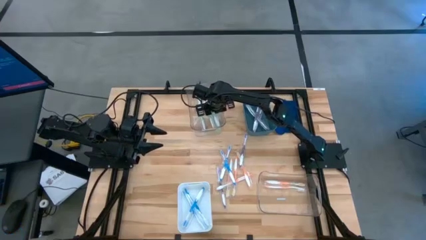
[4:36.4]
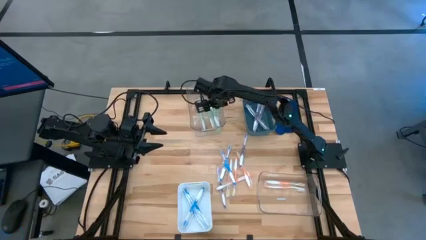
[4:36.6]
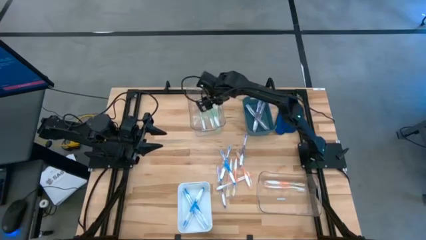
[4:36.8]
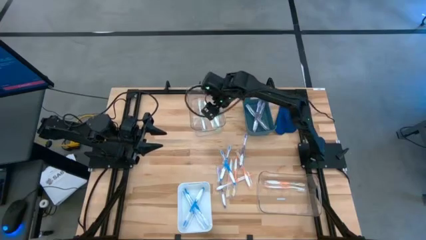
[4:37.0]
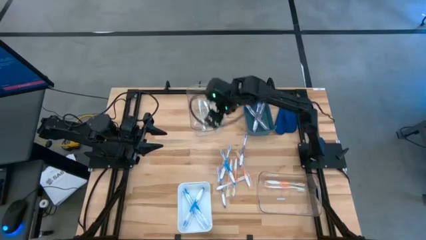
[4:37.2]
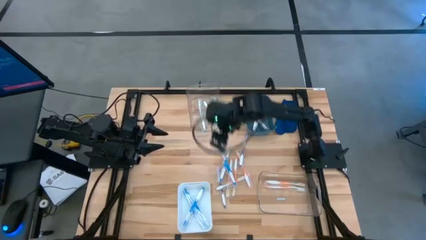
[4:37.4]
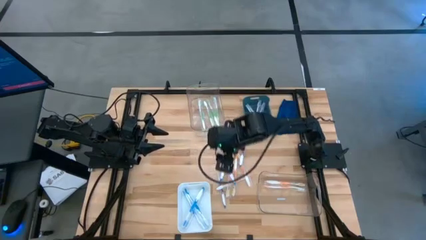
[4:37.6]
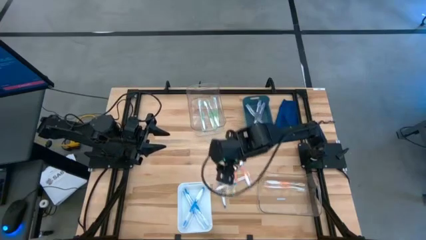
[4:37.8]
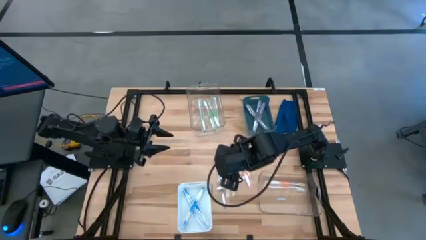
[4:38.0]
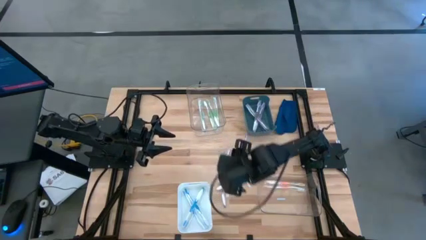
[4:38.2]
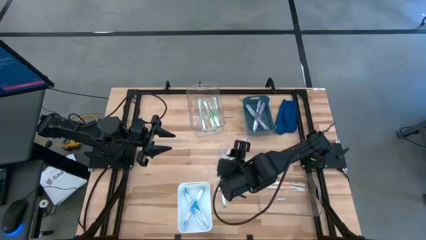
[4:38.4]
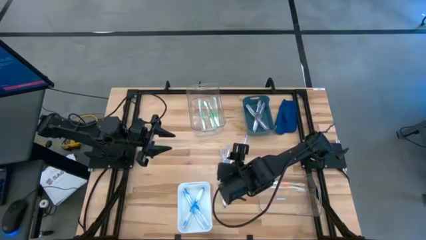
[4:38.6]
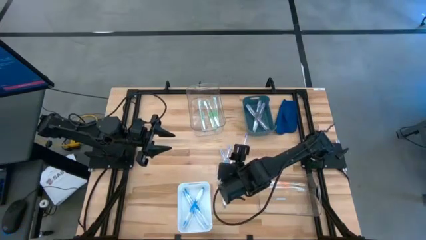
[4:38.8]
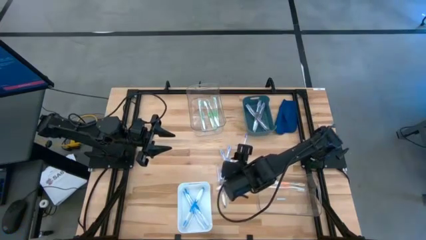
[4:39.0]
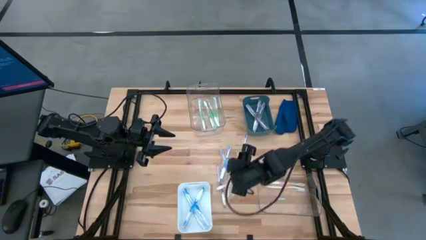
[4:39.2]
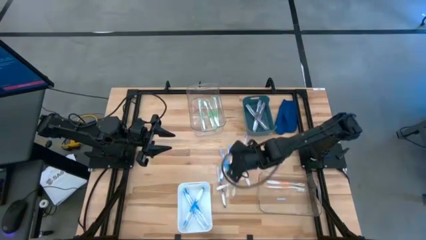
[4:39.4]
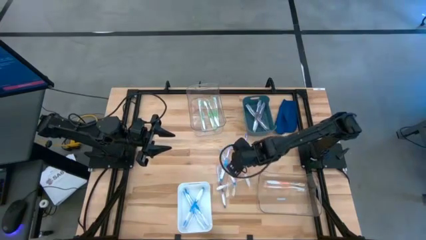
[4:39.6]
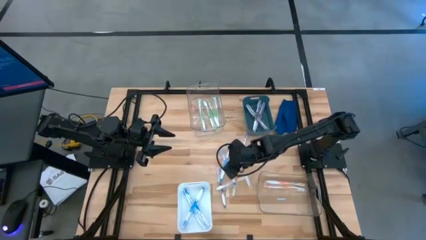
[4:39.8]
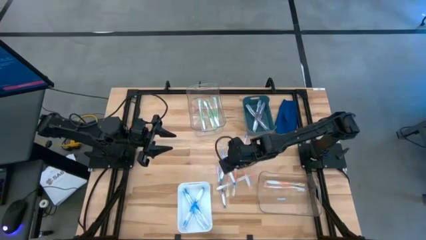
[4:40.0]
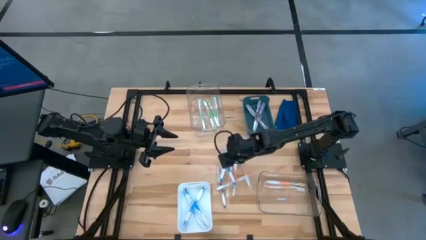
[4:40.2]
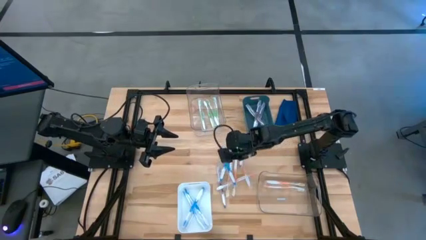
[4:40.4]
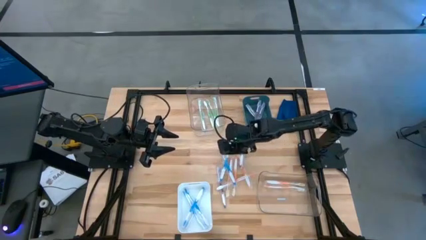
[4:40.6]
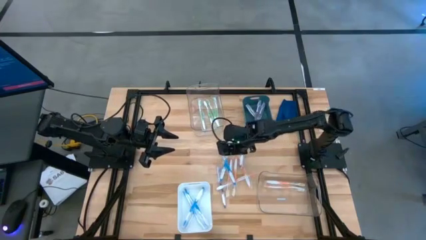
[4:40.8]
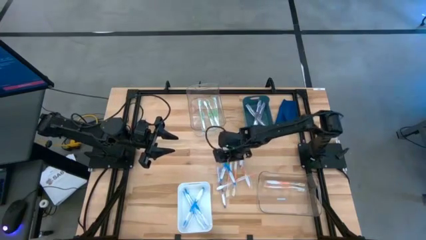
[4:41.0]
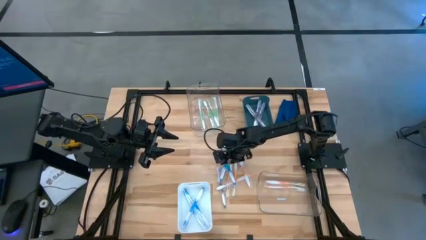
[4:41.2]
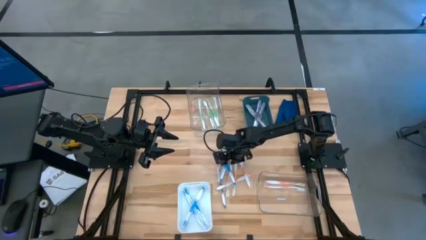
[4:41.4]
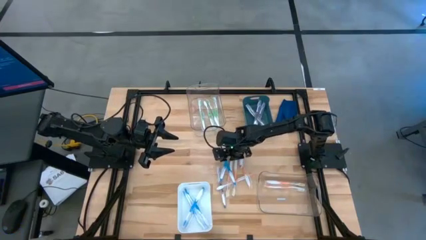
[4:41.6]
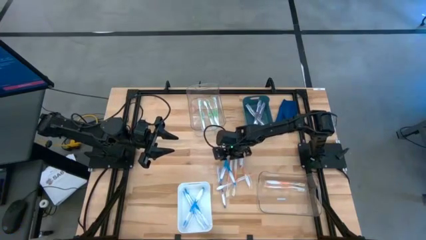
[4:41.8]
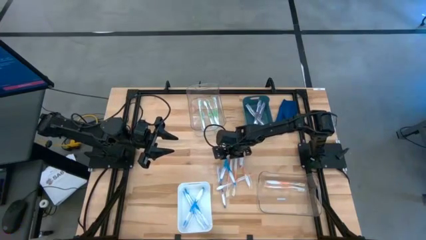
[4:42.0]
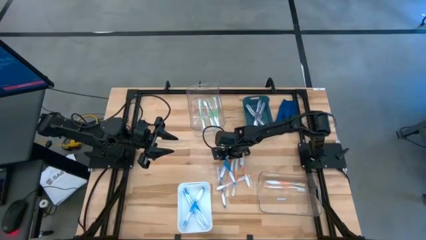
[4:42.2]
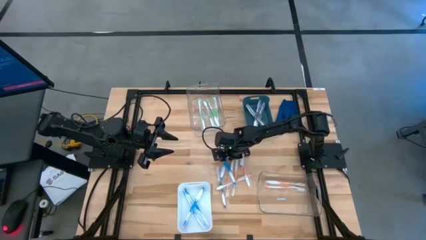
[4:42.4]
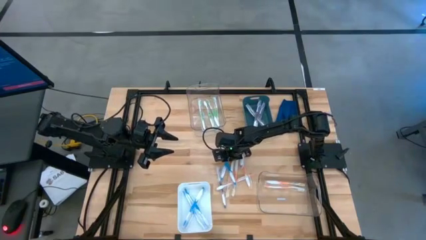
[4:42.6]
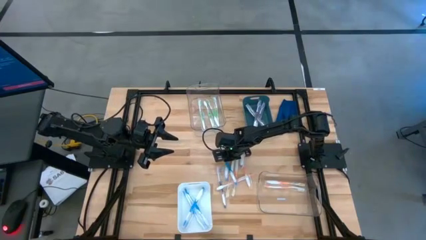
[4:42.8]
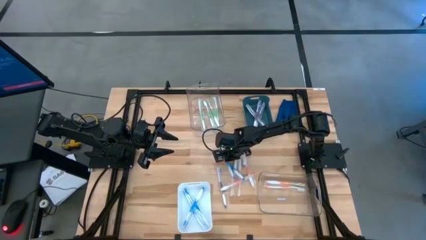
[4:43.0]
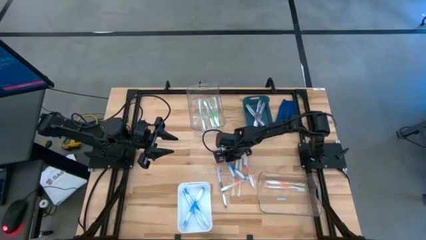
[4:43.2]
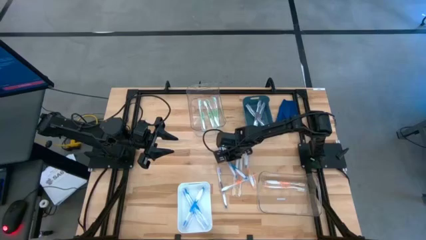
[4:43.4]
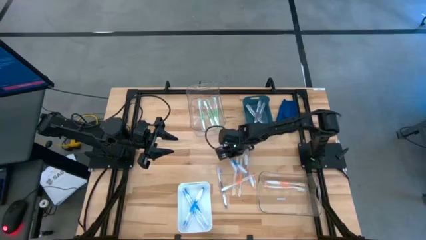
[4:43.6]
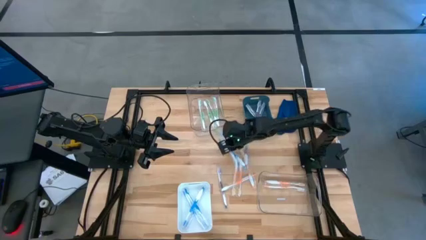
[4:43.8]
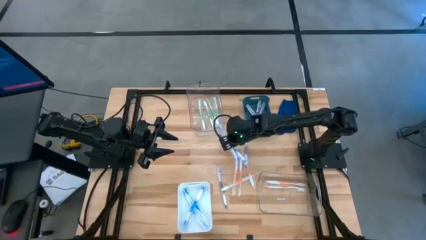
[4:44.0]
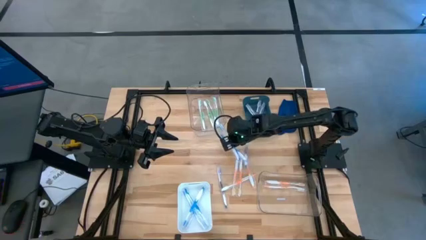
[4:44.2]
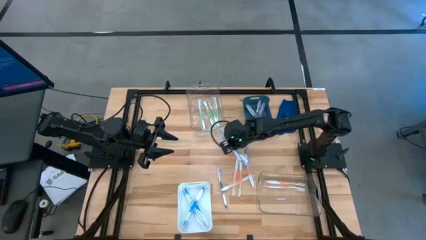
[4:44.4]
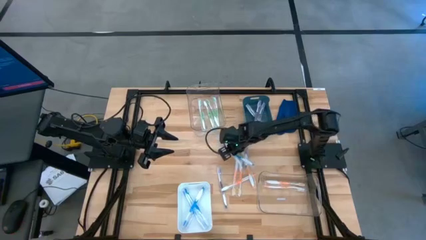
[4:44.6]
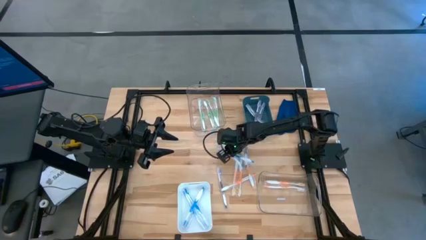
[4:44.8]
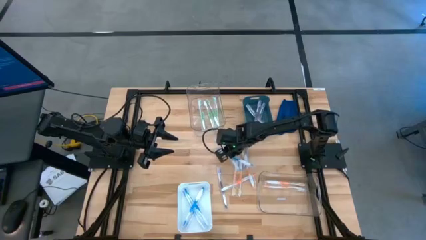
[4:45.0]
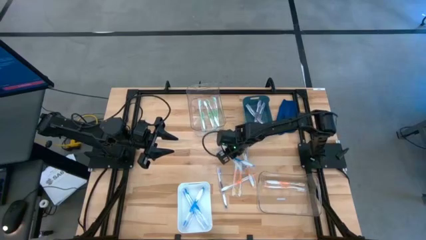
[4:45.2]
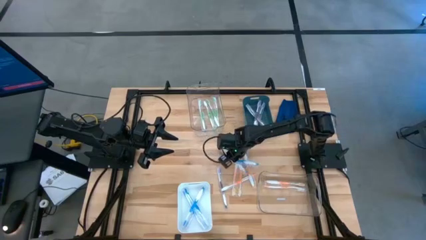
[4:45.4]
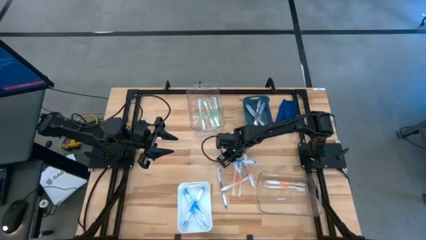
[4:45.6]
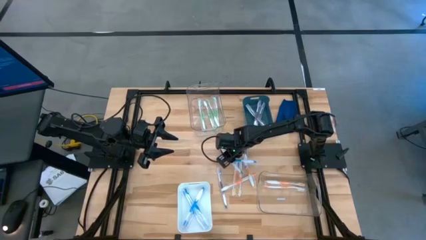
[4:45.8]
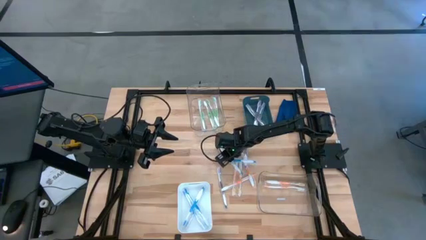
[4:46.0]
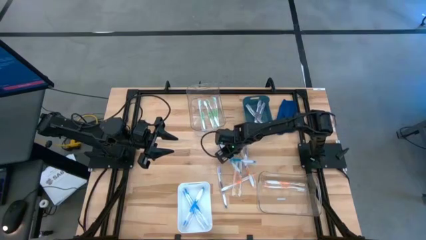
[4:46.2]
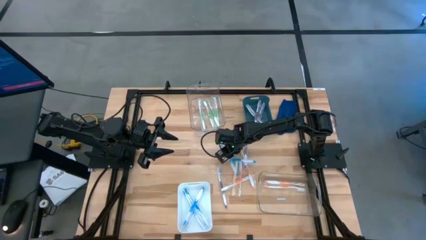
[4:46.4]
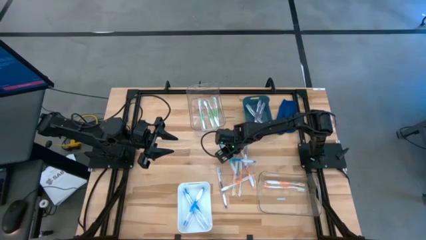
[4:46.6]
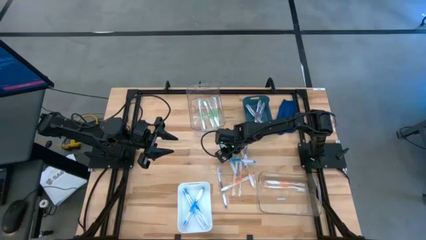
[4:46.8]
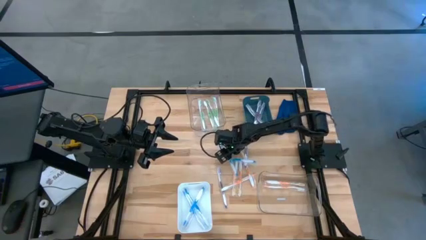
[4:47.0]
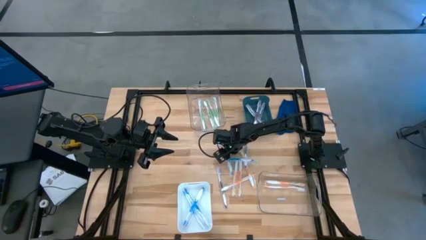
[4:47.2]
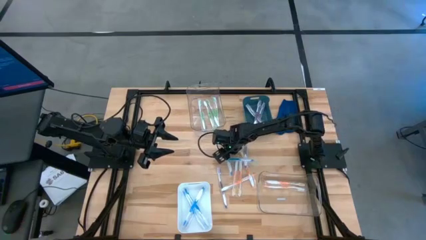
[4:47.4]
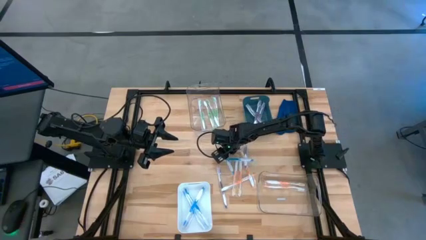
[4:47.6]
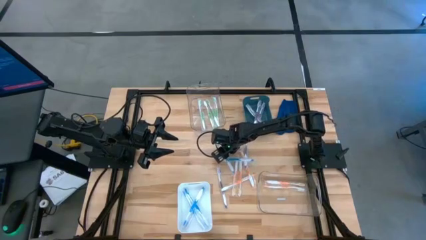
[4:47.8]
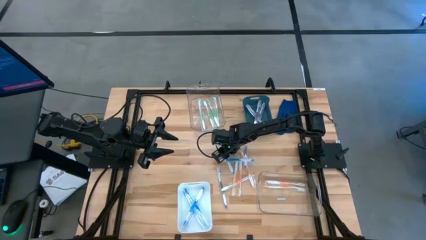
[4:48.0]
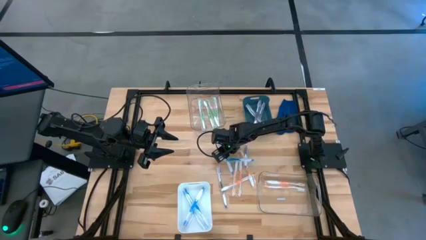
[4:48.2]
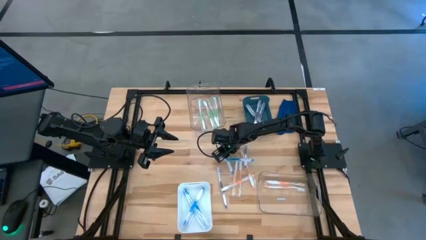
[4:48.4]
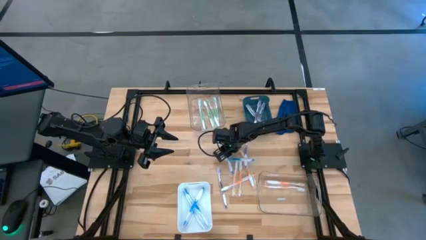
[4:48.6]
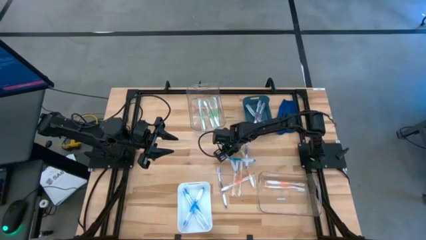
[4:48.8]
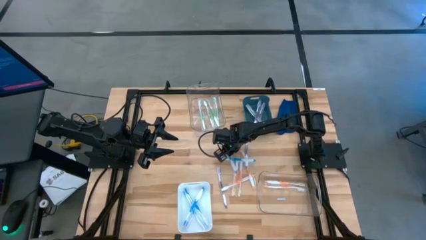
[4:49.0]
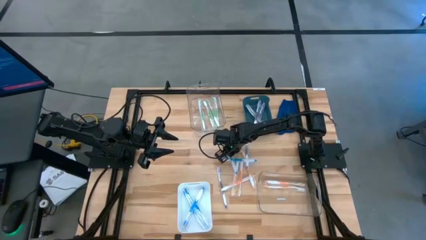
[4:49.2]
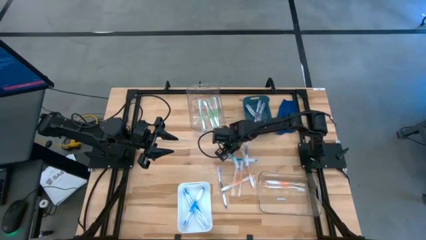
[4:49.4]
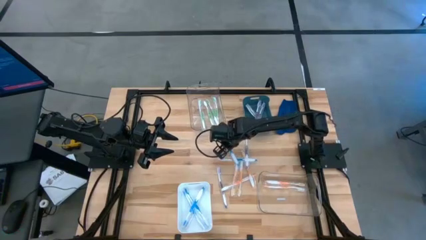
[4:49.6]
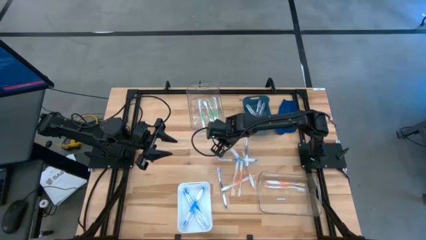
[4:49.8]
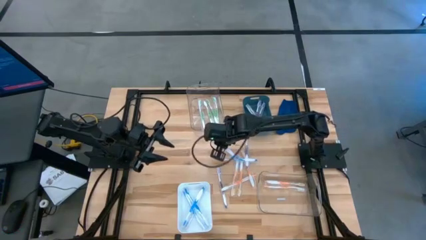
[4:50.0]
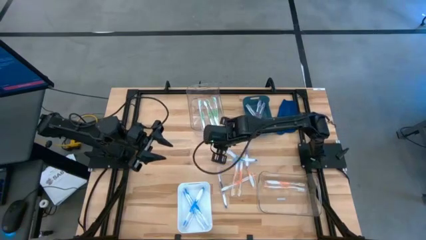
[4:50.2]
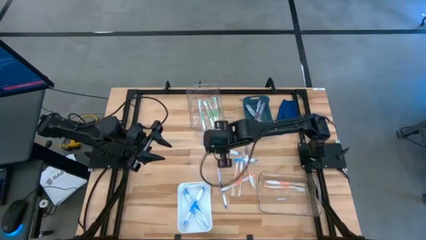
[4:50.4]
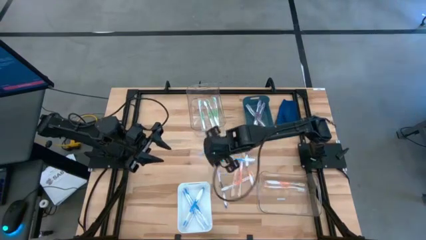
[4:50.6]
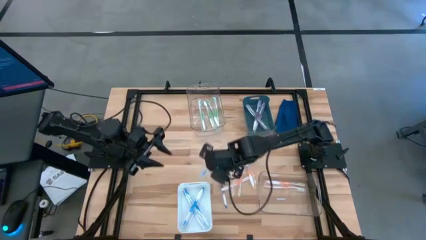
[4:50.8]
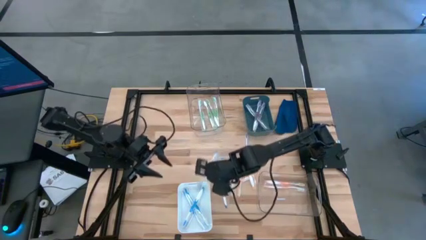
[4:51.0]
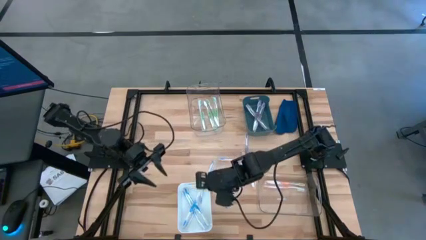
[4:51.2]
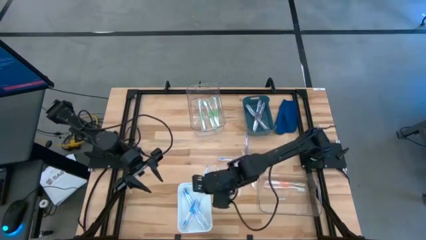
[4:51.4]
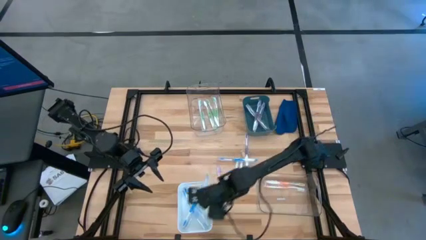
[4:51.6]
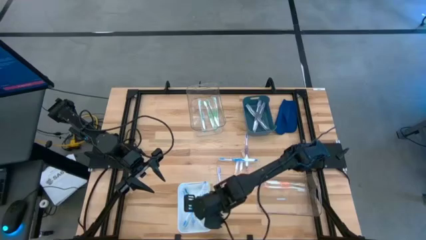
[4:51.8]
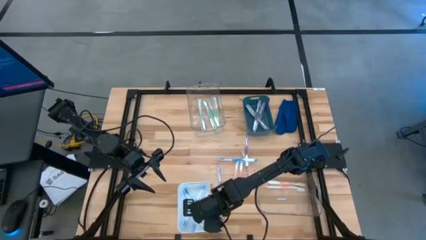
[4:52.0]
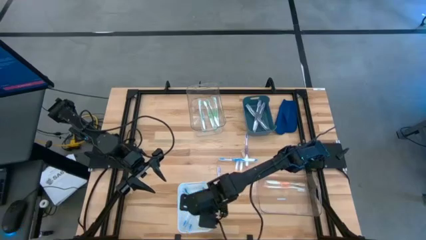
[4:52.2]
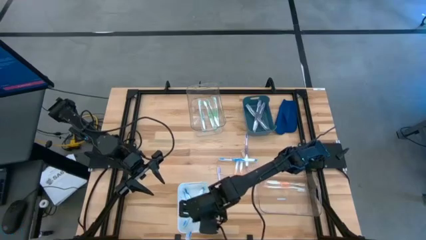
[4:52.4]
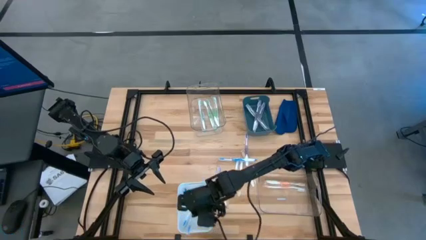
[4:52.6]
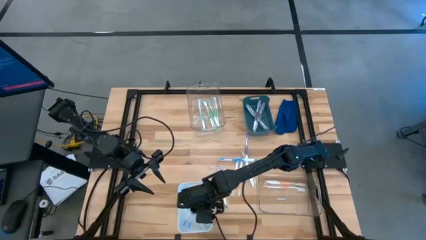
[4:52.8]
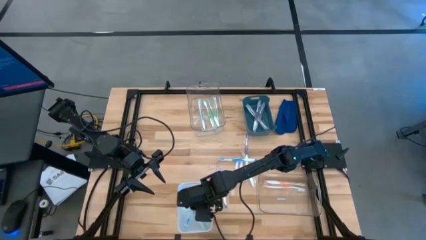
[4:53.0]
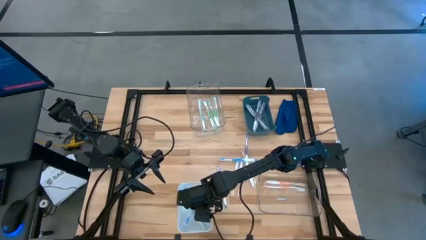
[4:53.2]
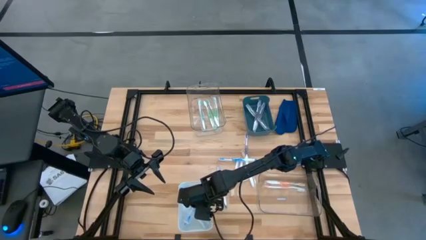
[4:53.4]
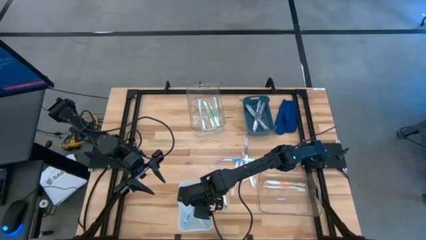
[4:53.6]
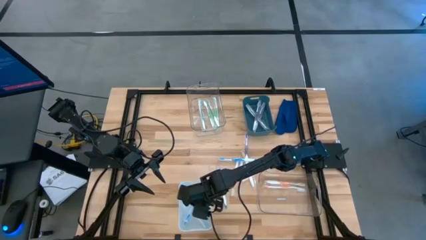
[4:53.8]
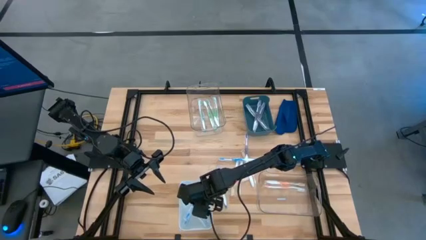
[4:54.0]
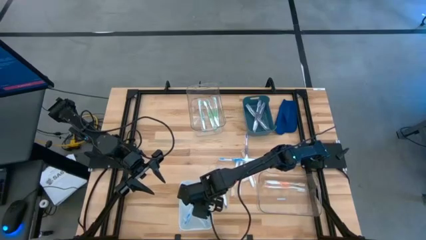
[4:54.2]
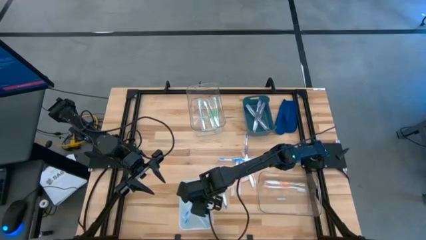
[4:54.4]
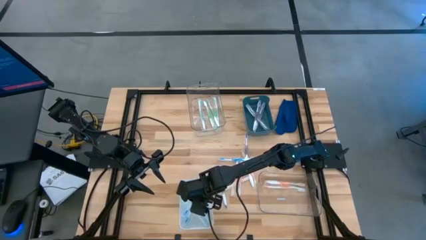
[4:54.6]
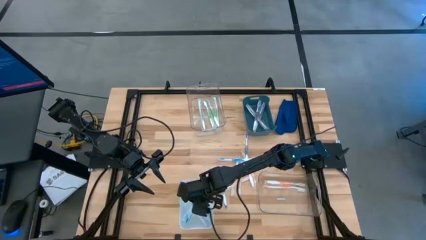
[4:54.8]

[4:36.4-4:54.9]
Task: Pick & Place Toothbrushes
Put the blue toothbrush into the white bin
